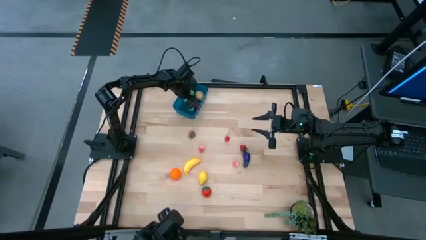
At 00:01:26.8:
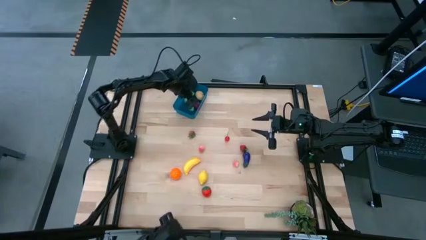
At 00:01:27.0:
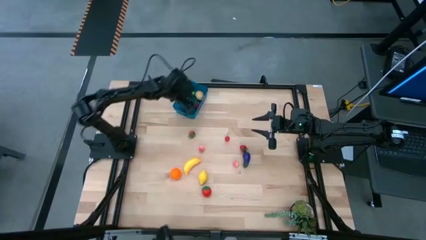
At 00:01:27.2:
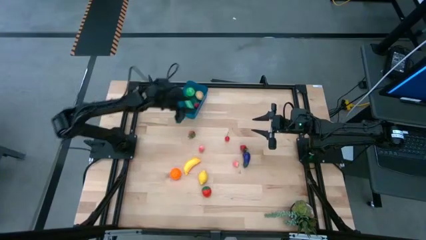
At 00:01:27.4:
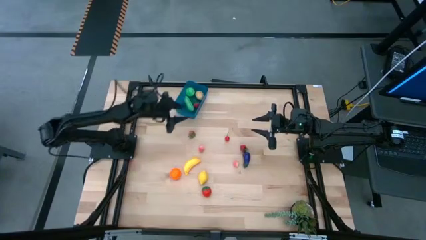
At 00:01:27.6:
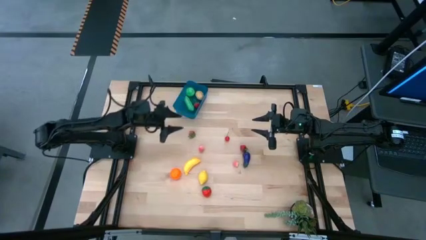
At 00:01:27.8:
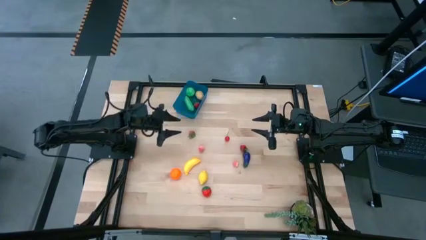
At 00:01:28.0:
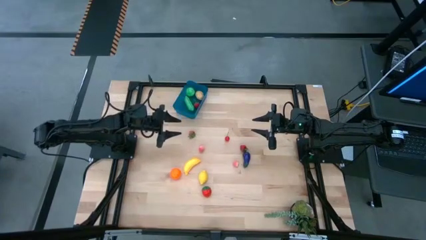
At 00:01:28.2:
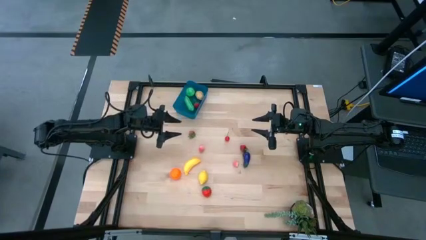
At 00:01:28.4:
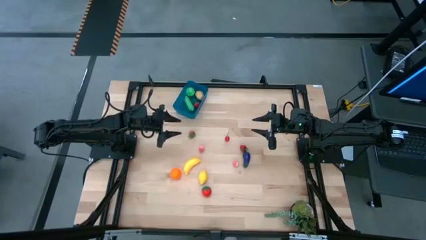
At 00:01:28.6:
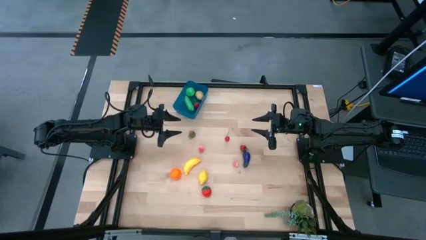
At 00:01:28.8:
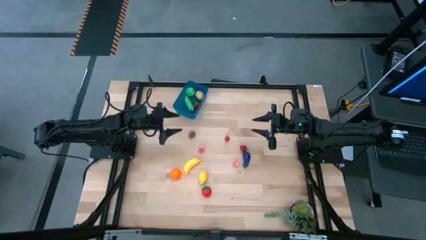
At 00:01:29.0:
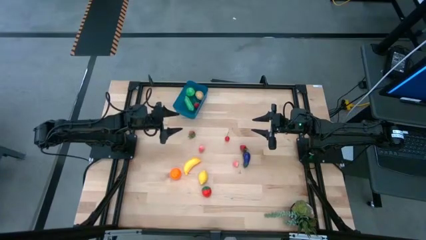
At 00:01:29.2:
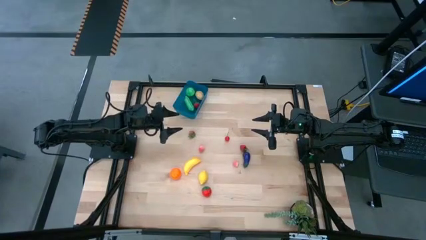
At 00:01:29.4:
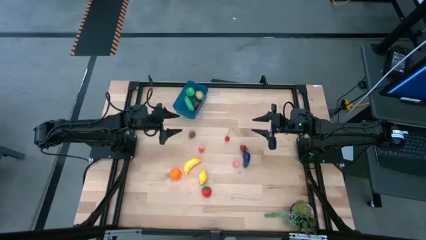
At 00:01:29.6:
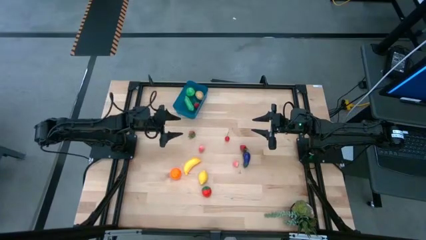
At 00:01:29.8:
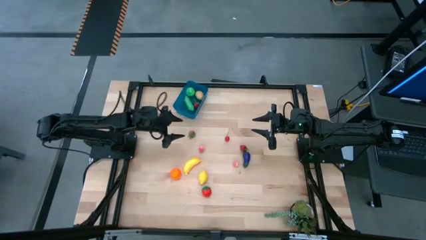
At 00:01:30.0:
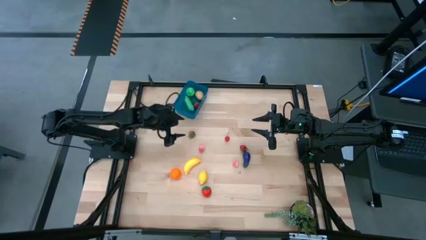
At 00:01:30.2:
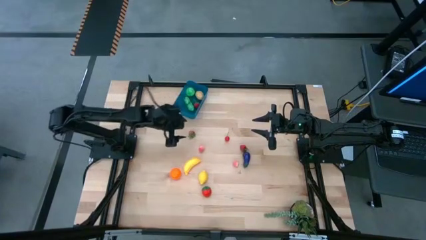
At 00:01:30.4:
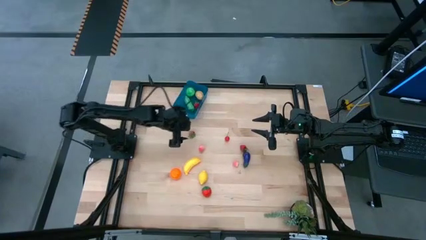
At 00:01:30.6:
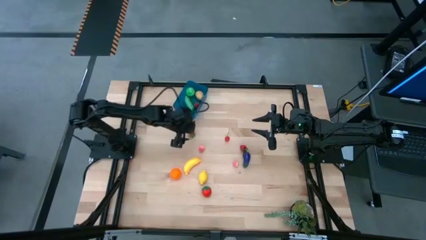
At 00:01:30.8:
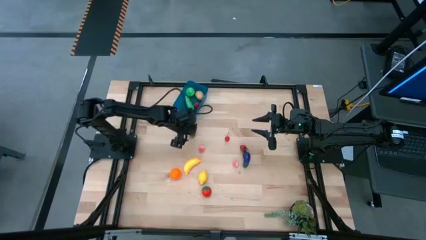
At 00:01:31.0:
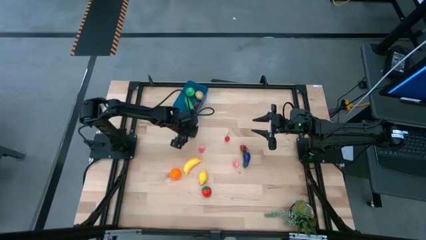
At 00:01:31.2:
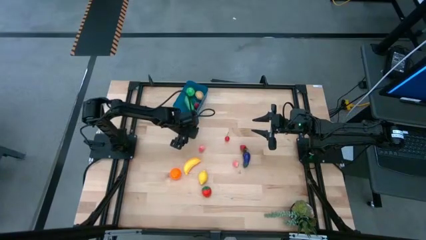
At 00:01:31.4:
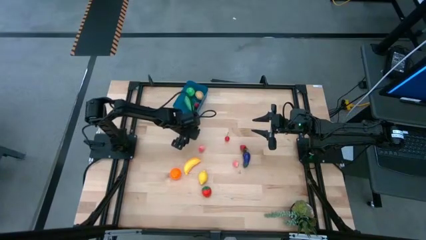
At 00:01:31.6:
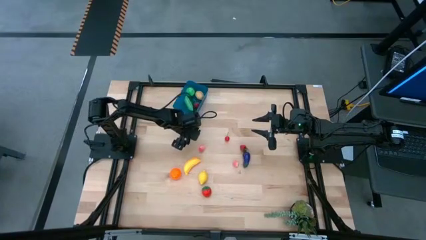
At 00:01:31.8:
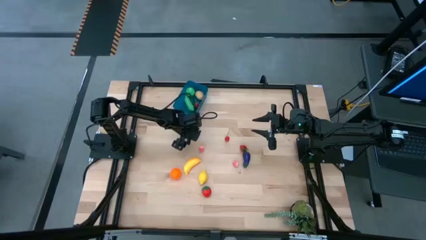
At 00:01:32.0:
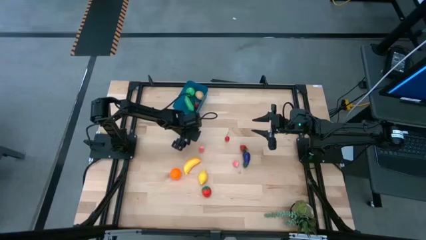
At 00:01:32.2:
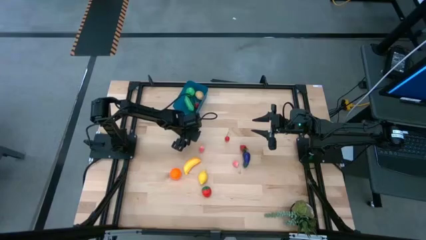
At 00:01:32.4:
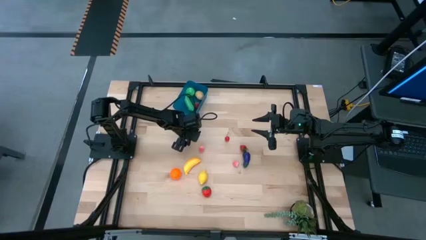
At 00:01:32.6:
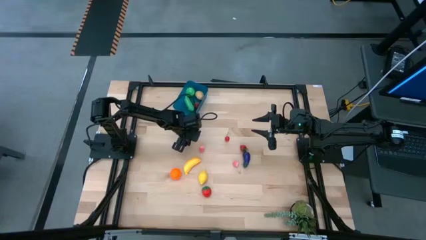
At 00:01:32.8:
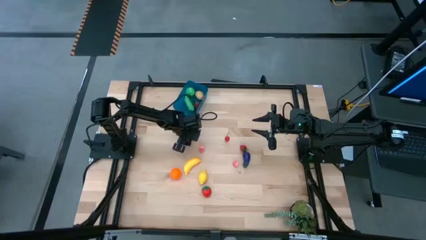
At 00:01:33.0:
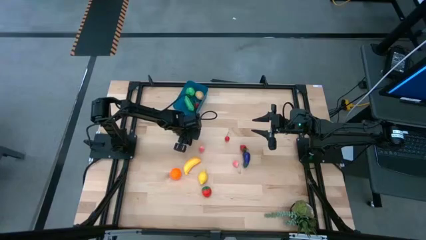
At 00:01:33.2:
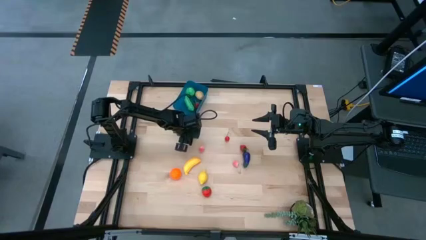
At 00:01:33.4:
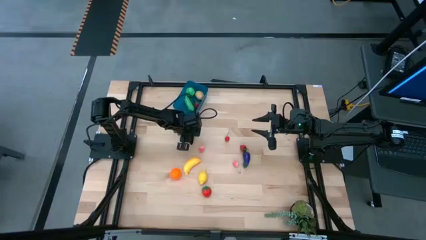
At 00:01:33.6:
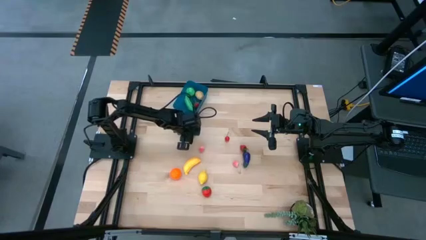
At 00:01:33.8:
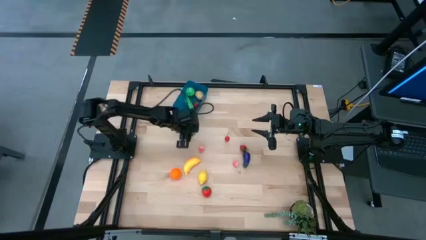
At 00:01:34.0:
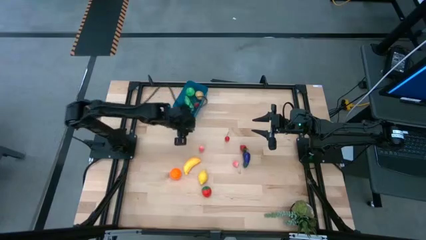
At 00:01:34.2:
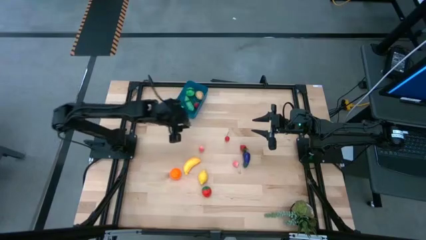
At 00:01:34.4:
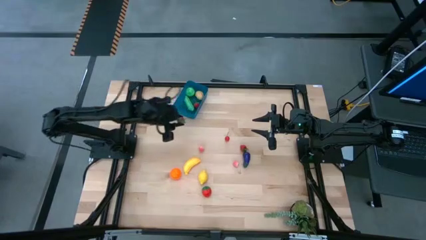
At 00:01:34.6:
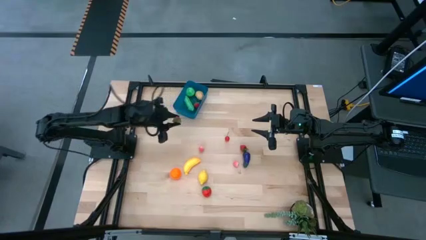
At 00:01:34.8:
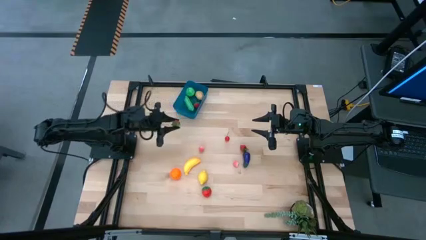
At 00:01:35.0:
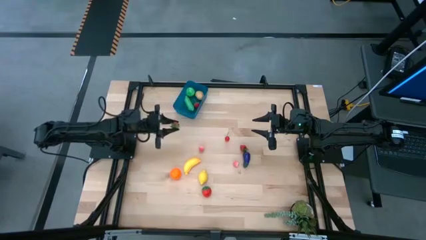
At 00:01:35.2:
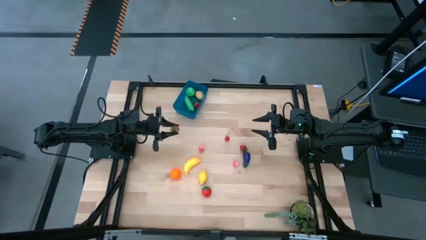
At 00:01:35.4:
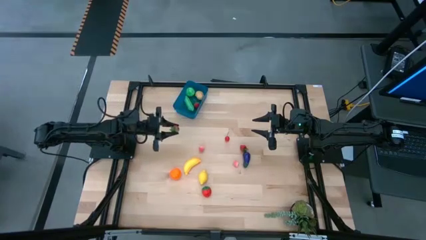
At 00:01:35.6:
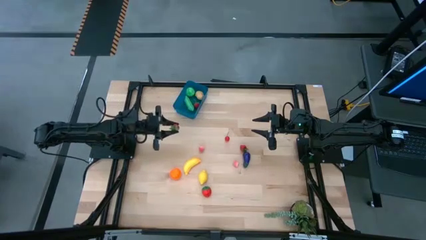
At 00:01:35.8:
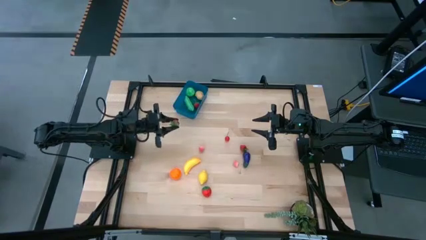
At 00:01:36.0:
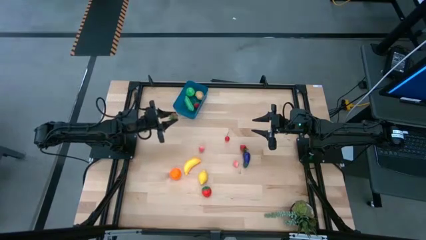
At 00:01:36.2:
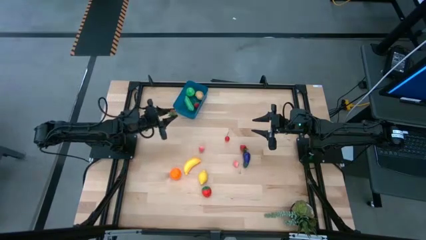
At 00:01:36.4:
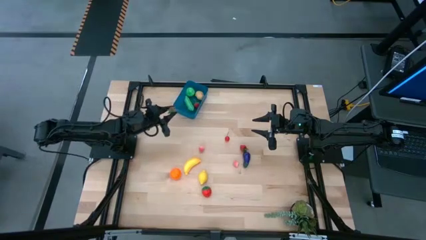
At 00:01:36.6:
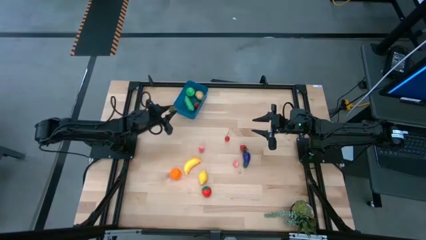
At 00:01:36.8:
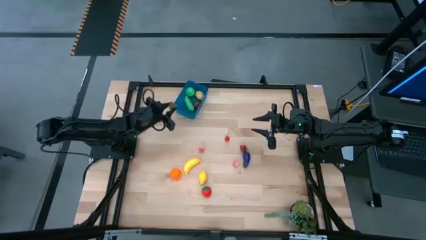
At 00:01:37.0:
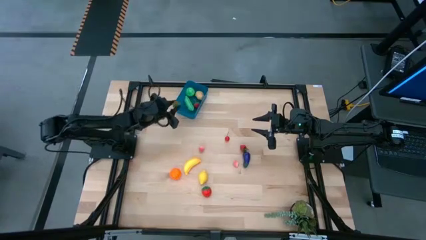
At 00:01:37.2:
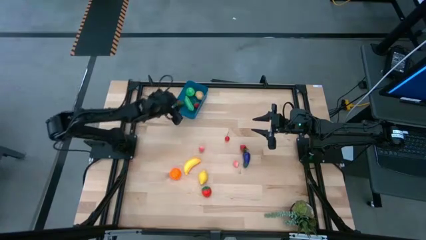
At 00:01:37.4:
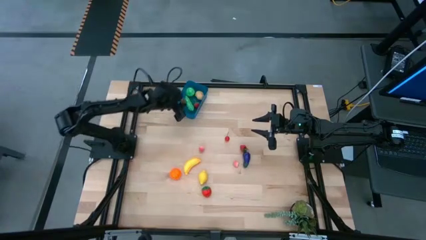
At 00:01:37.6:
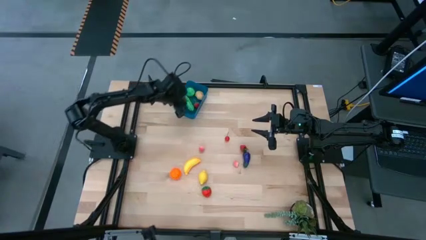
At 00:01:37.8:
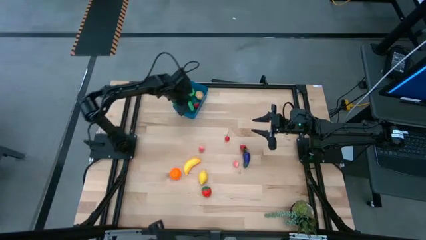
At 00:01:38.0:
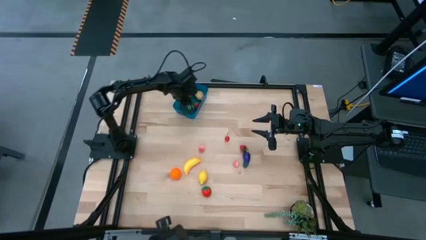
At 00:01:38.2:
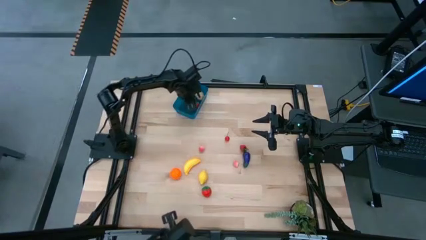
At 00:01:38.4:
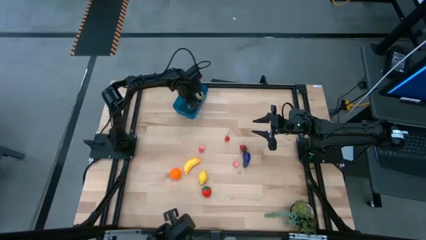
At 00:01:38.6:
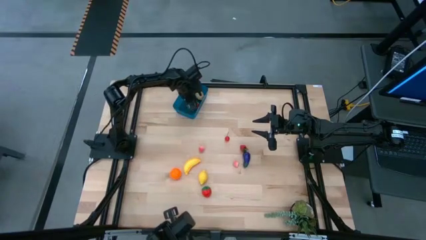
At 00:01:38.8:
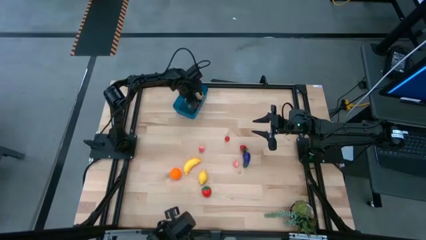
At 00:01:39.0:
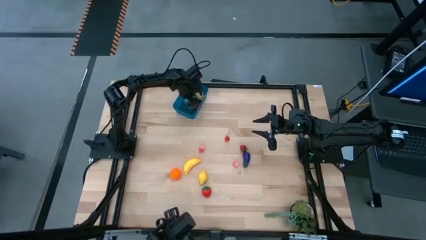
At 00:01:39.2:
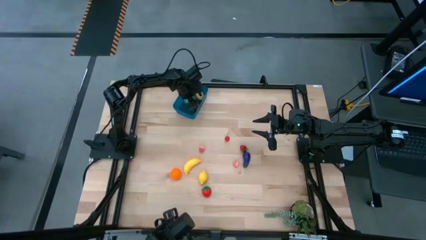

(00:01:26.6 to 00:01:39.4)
Task: Pick and placing Produce into tupperware
Put the top left red strawberry into the blue bin

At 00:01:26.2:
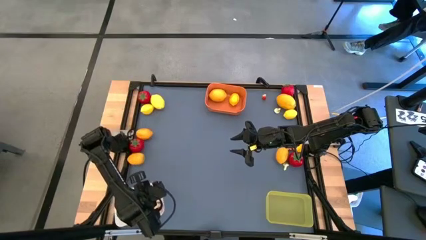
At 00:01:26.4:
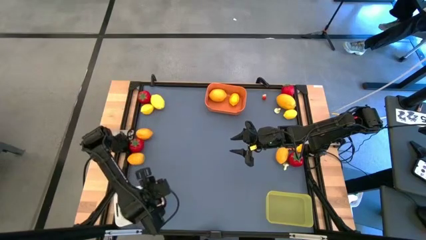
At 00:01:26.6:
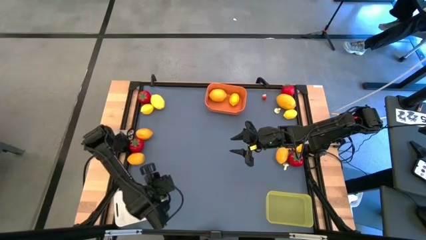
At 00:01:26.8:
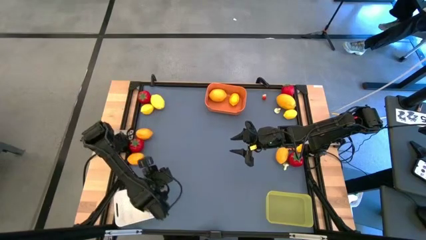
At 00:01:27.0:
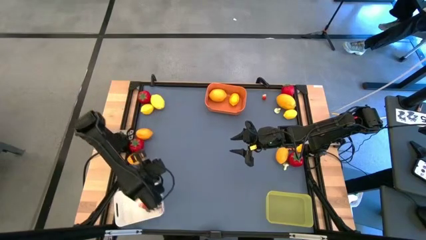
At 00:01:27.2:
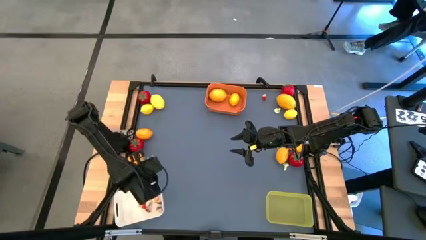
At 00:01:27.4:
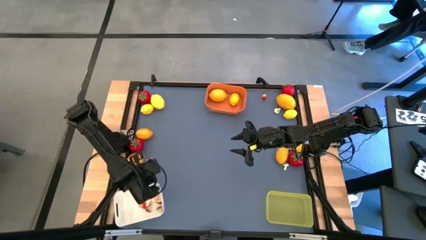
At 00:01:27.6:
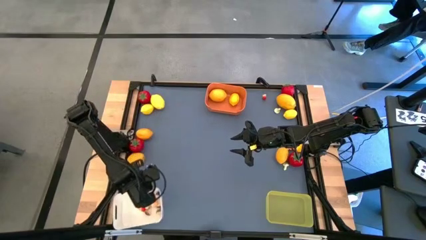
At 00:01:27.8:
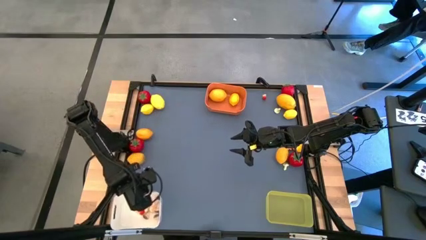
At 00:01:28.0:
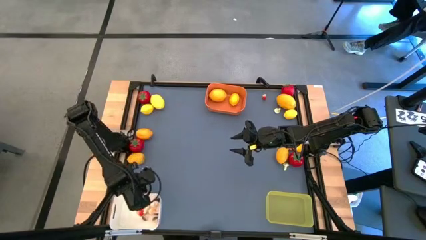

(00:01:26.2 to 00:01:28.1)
Task: Sort produce into baskets
Adjust the white bin
